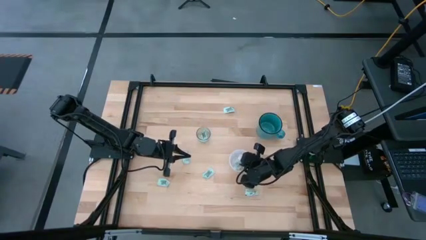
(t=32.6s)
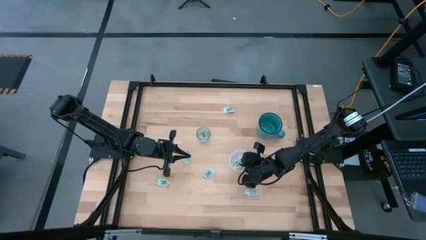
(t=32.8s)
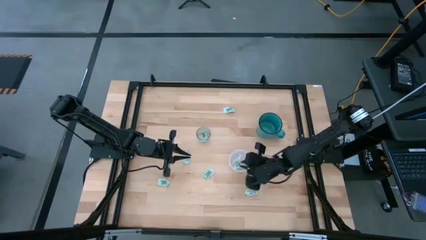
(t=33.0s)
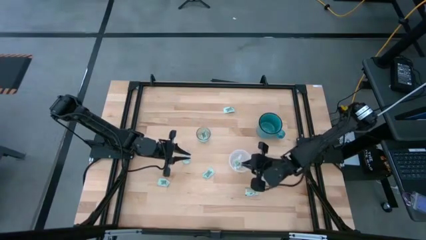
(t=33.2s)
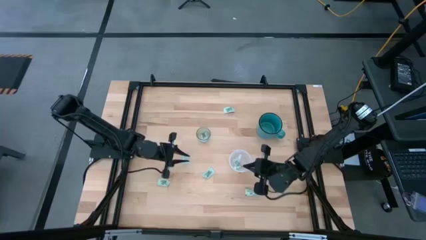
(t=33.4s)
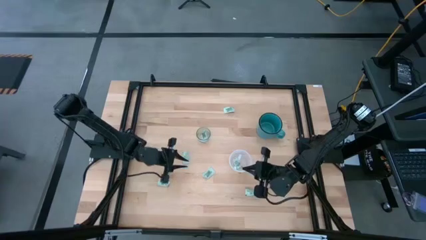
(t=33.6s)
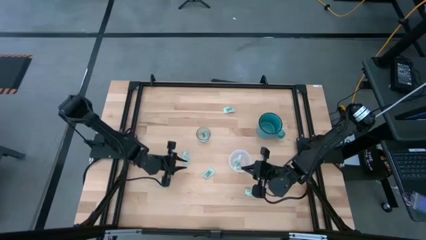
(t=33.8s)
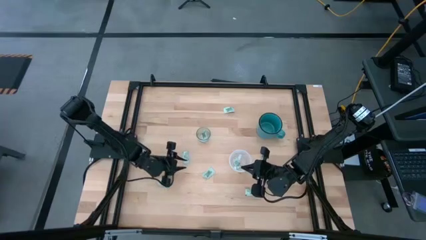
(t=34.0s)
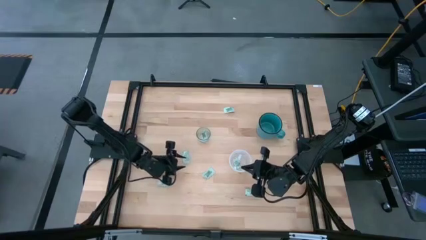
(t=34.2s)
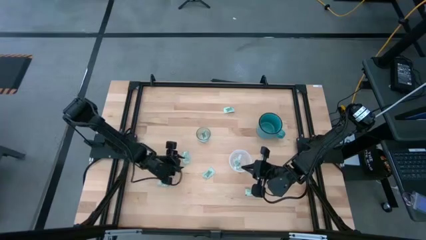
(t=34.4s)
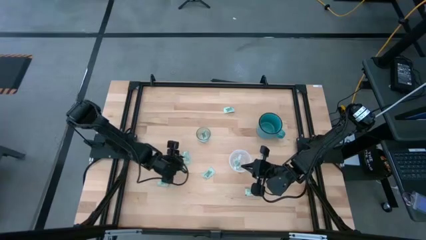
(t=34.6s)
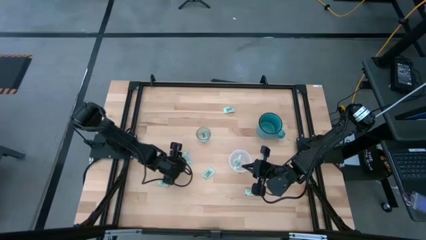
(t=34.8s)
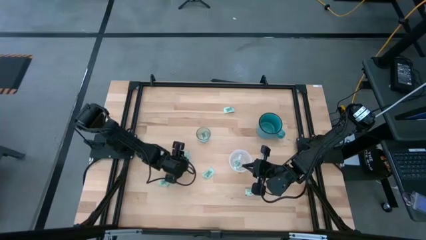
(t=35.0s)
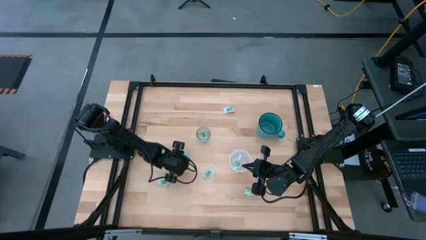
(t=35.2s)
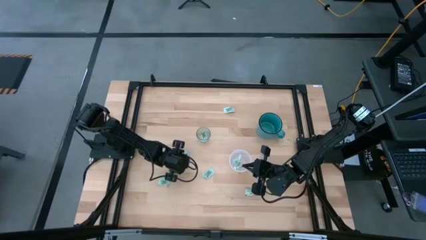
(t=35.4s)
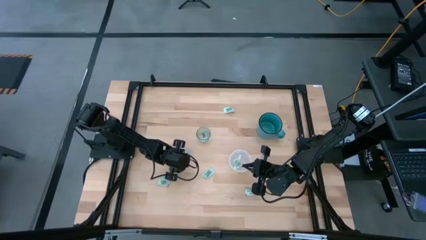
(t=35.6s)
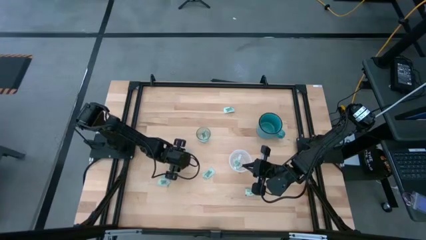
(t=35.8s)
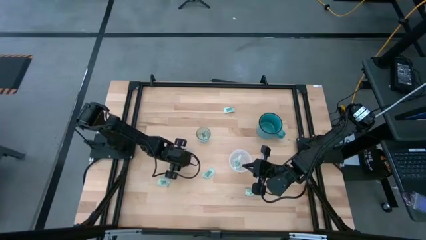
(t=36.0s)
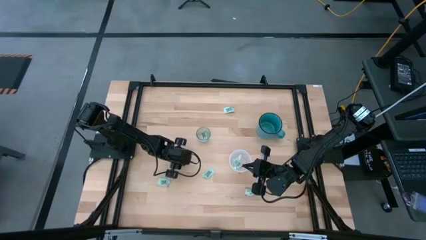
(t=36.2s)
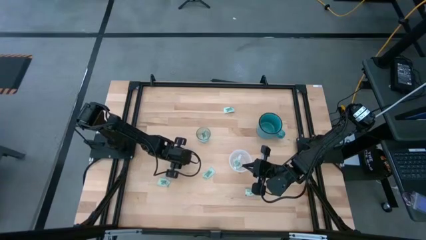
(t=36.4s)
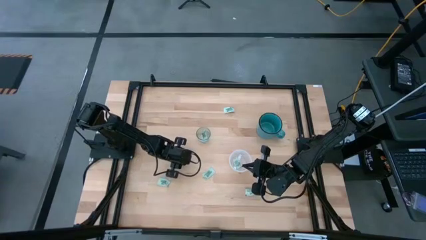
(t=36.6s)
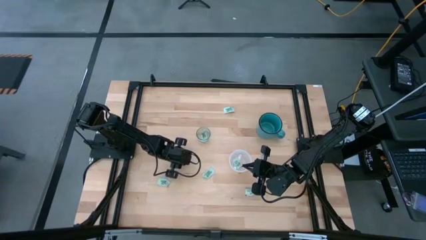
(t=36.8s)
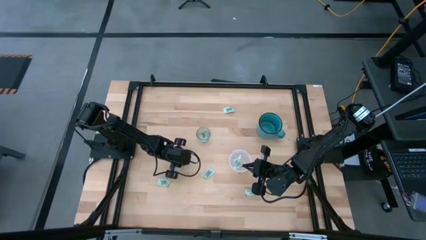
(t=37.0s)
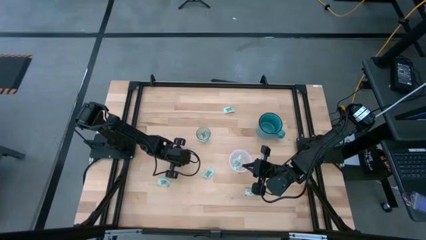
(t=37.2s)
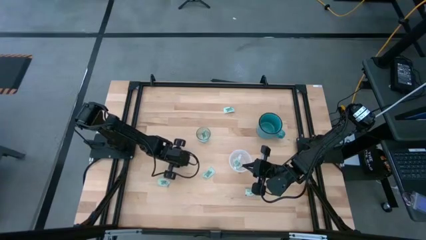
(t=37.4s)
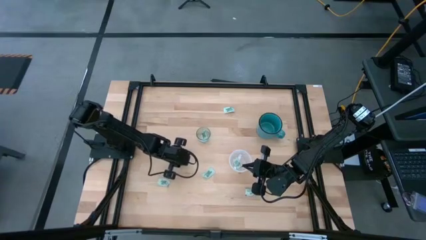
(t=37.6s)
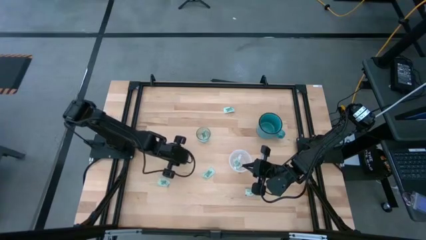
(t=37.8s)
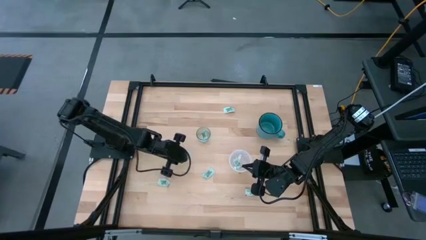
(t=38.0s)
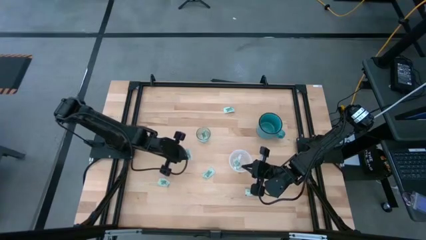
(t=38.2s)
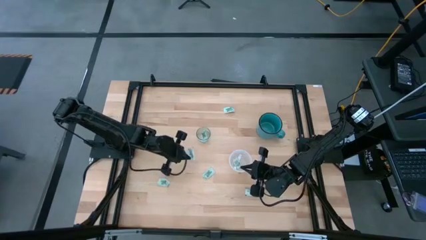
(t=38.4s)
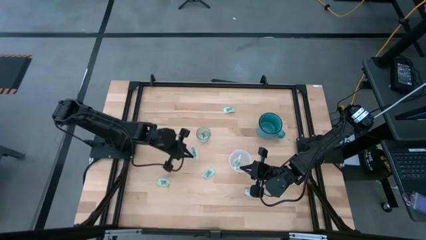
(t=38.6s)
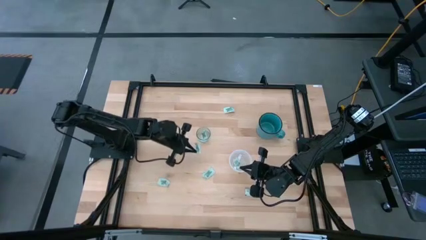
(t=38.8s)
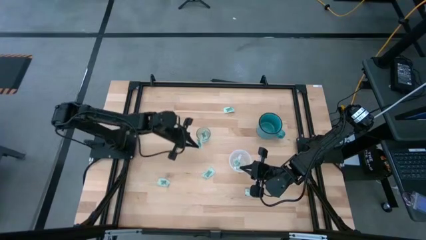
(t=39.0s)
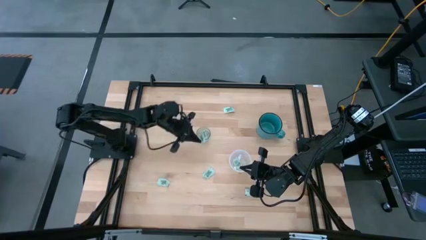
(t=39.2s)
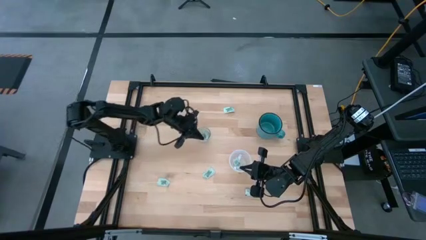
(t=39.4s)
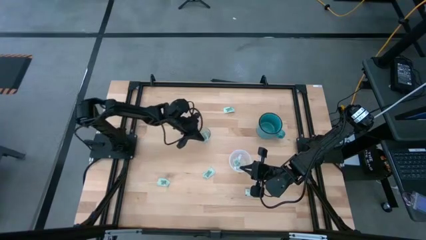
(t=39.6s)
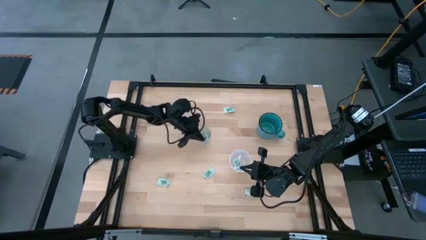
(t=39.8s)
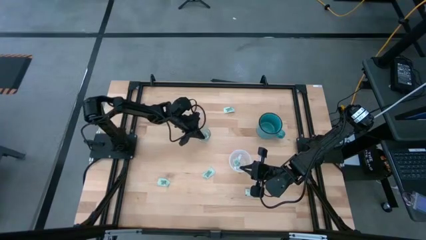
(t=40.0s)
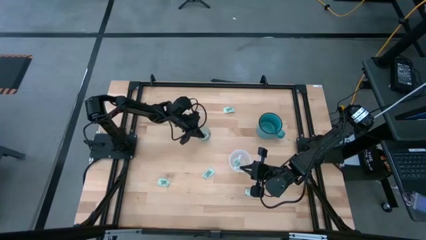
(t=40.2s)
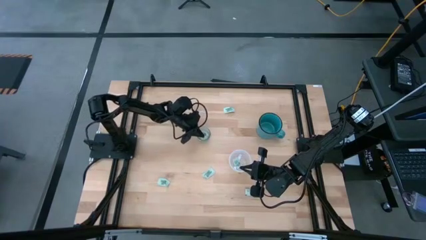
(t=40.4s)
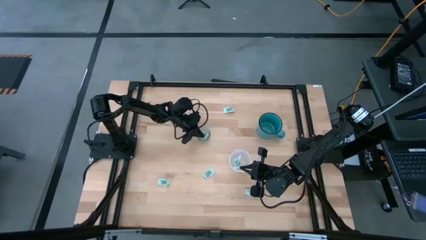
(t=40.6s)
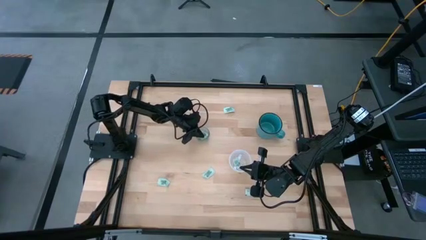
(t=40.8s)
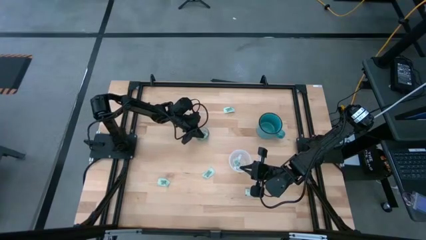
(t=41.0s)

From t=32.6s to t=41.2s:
Task: Pick and place Stevia / Truvia into bins
Put the stevia packet into the transparent glass container

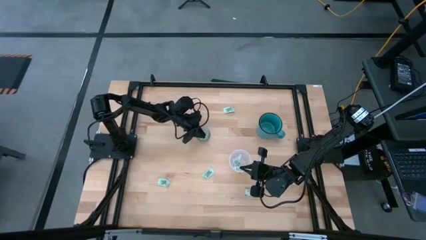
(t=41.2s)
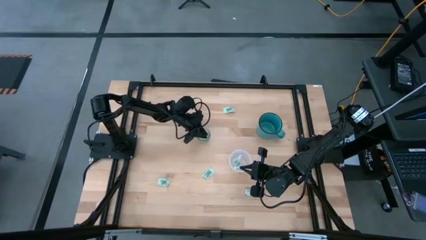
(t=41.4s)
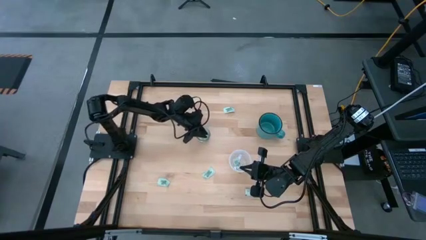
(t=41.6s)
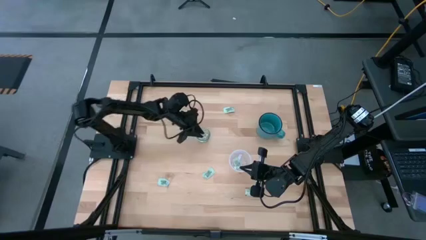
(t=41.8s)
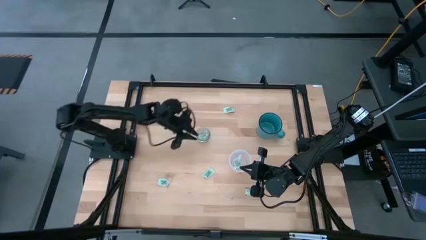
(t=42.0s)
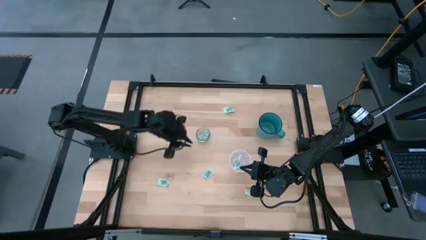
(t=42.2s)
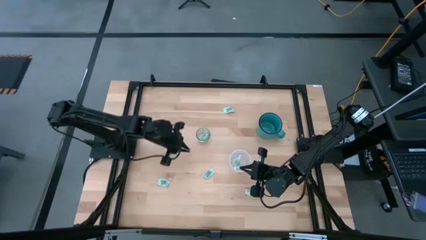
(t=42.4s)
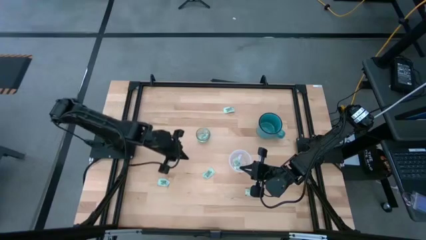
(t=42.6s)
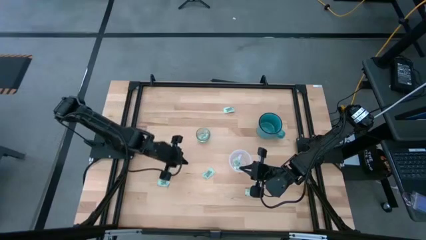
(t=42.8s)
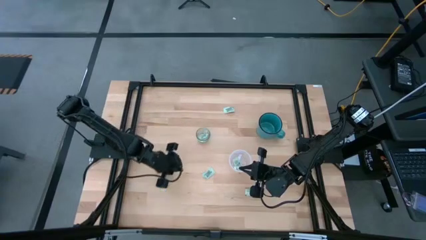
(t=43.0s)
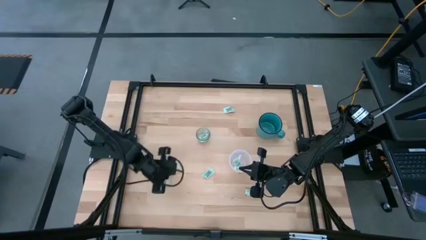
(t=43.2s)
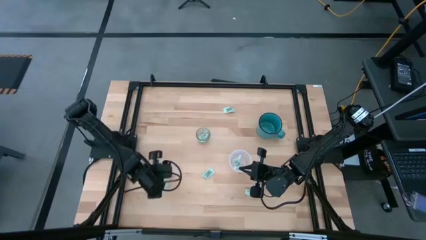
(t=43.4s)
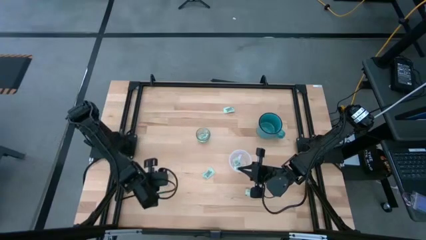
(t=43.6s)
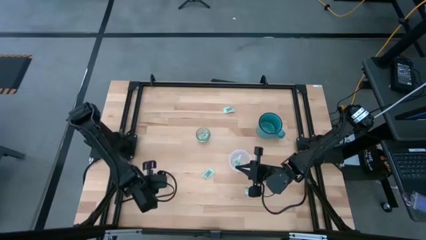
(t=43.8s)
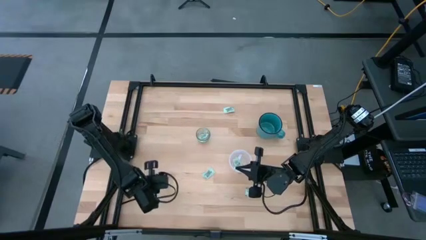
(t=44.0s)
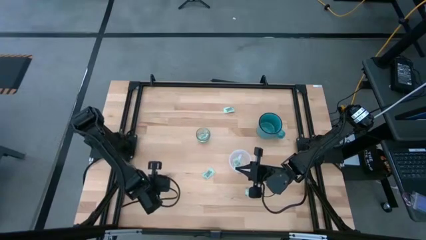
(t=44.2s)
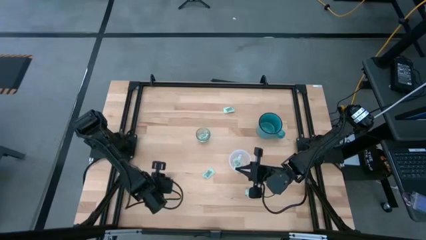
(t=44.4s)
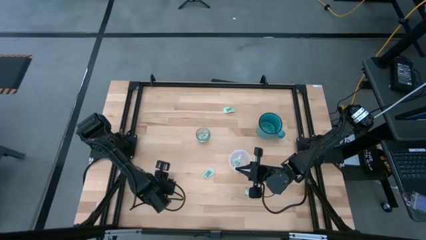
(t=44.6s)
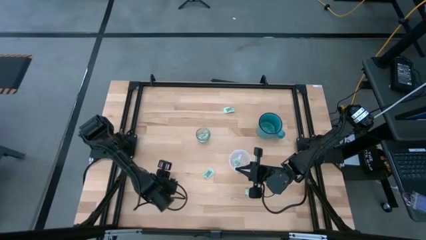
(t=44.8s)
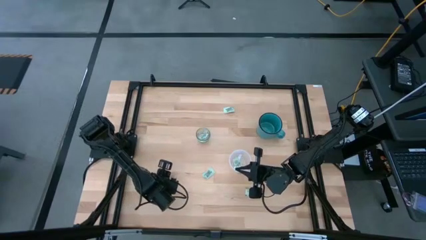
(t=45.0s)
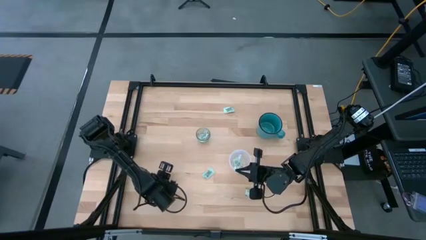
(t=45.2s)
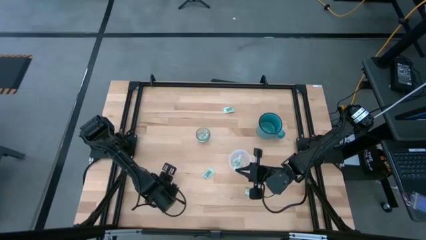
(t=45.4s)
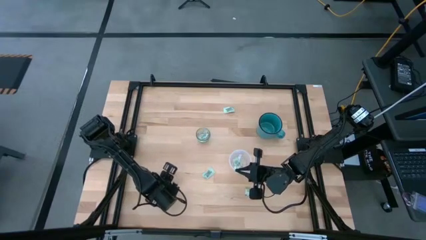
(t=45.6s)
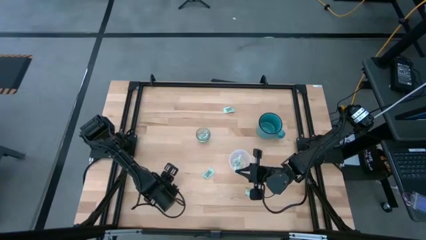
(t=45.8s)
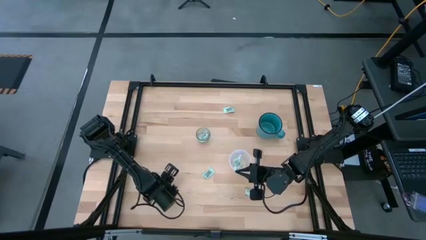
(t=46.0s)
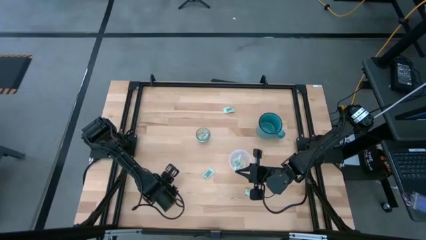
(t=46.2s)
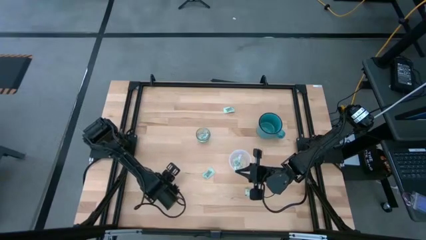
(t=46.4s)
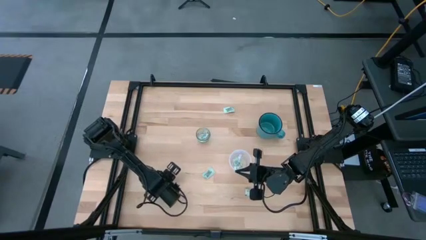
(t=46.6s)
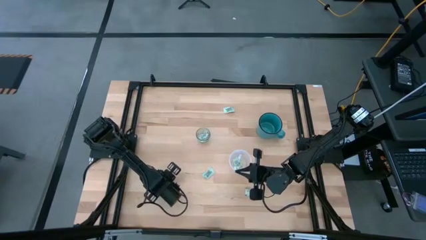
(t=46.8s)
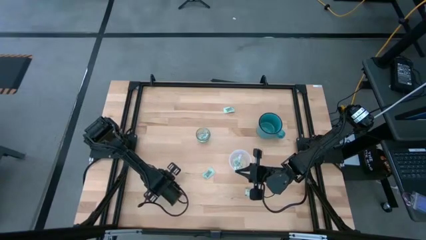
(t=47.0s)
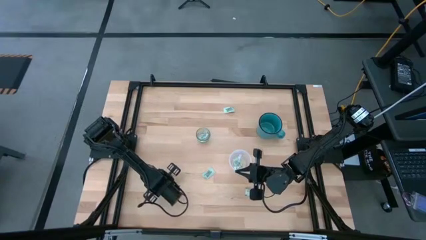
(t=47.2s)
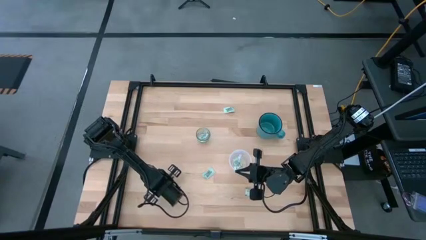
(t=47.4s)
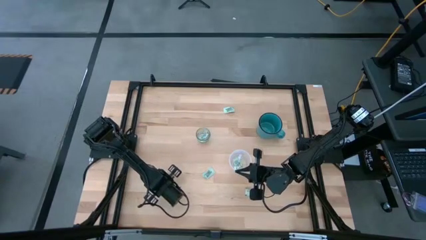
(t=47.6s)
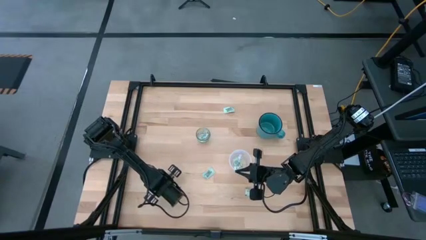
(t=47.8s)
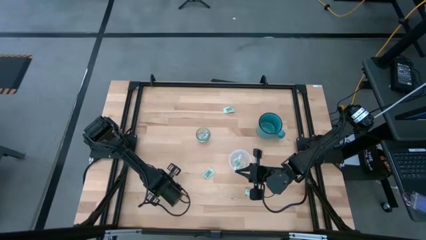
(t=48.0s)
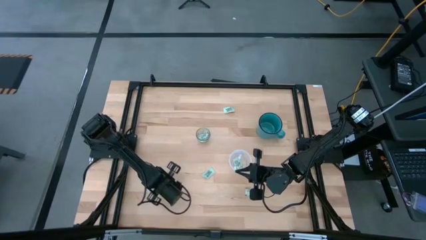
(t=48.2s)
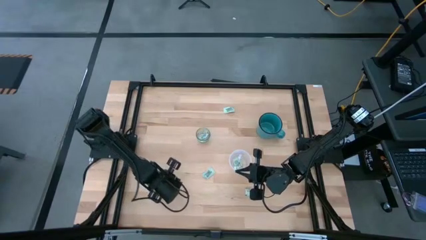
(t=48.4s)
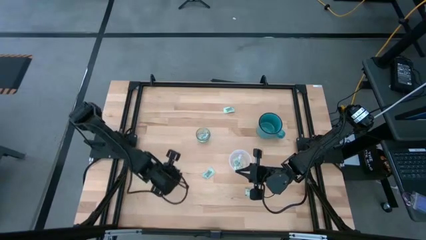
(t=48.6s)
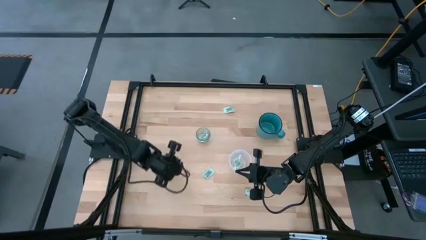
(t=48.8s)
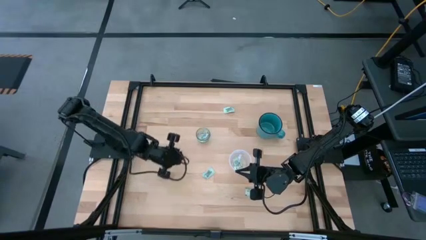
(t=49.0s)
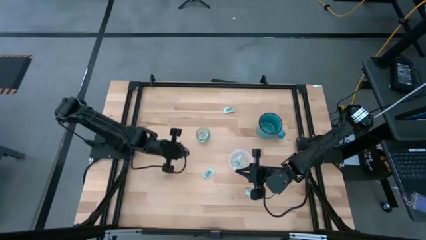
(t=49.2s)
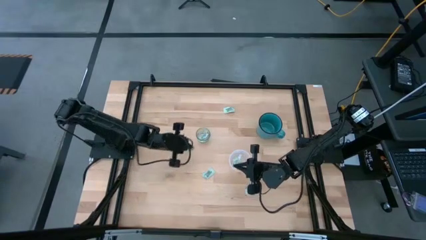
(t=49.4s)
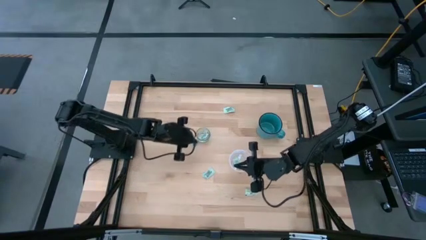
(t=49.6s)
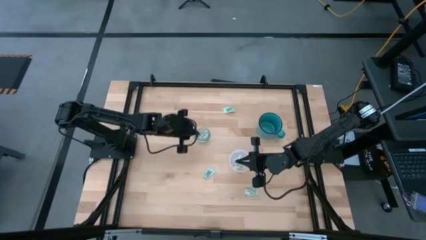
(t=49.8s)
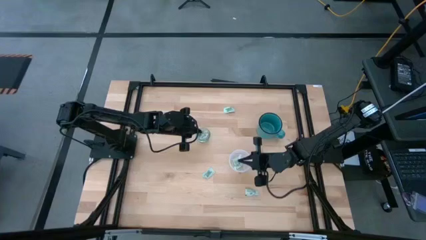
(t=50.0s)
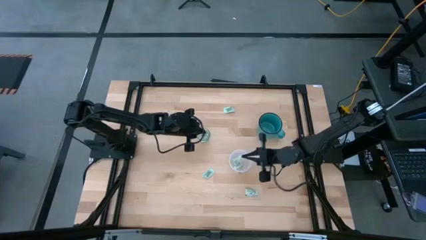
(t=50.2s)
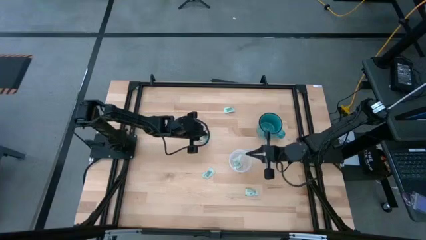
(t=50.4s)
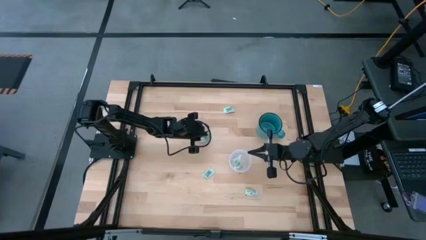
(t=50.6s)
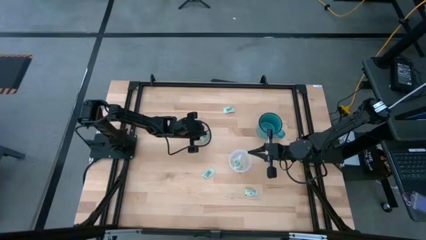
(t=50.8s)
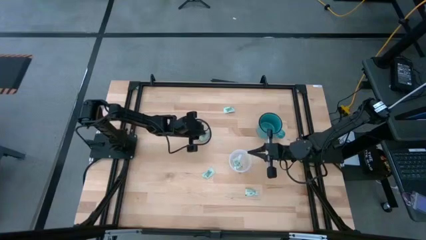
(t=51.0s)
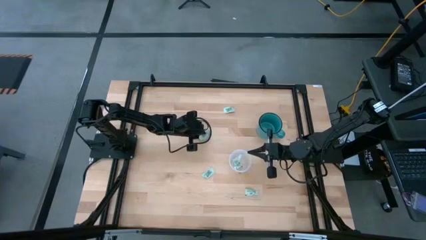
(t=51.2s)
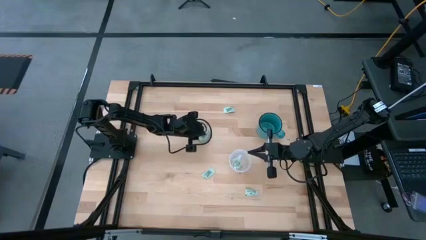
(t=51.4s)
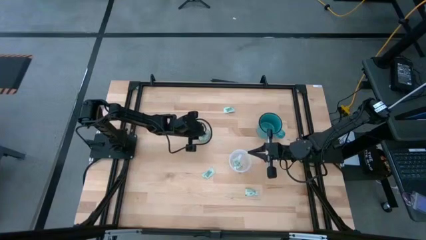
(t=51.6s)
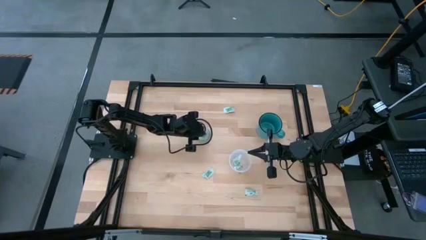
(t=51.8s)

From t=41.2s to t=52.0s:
Put the stevia packet into the transparent glass container
